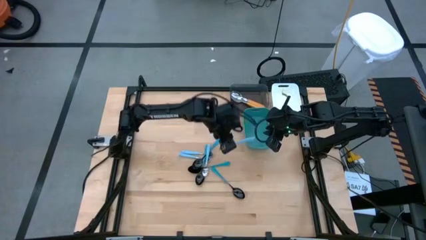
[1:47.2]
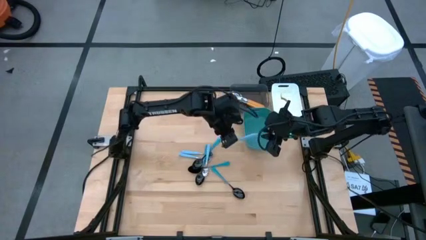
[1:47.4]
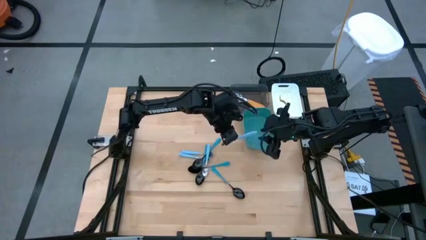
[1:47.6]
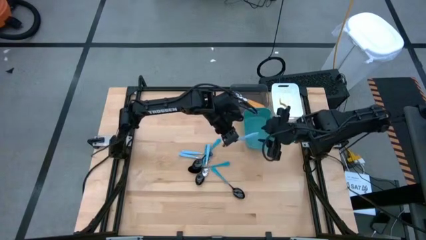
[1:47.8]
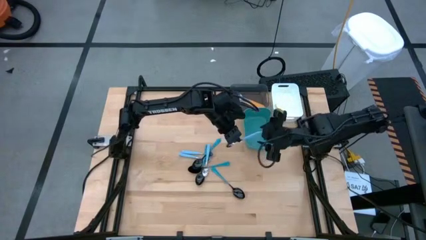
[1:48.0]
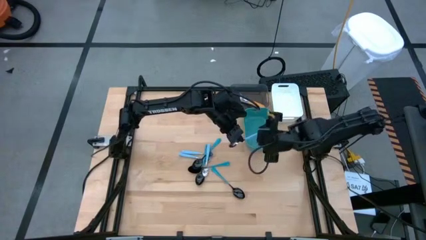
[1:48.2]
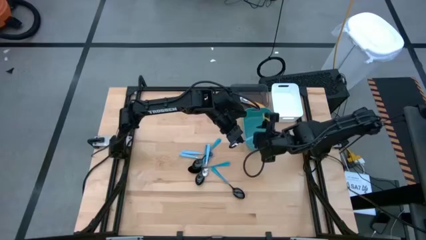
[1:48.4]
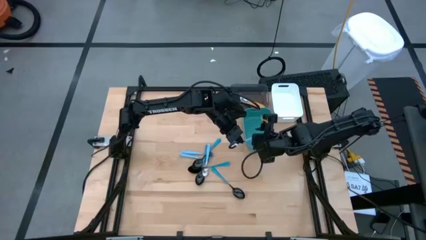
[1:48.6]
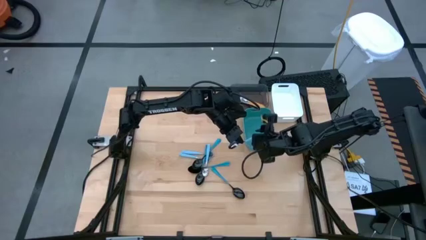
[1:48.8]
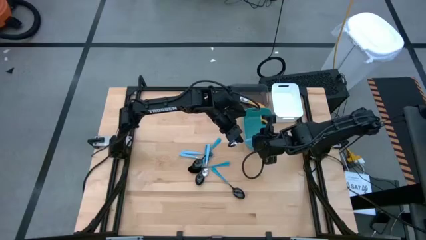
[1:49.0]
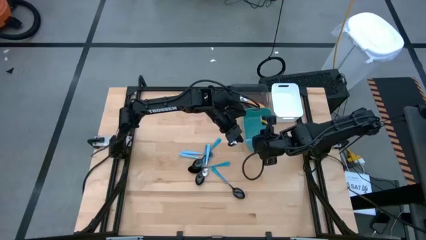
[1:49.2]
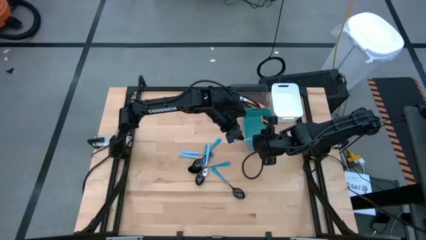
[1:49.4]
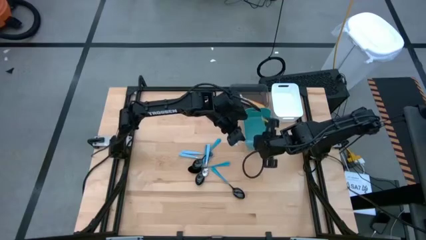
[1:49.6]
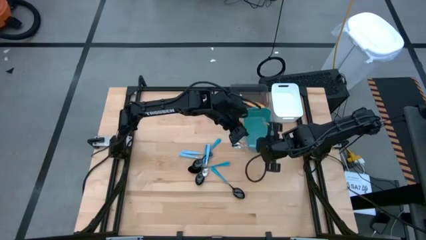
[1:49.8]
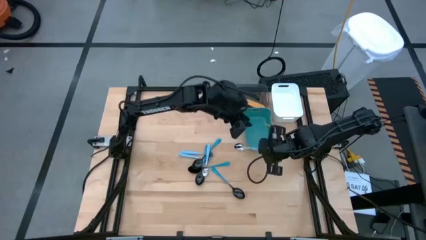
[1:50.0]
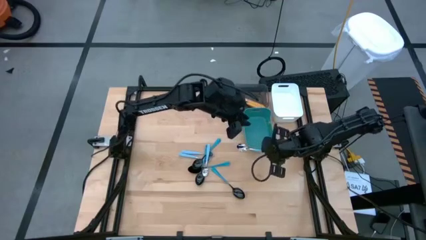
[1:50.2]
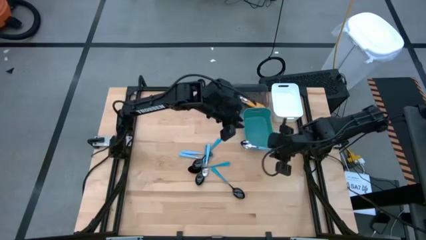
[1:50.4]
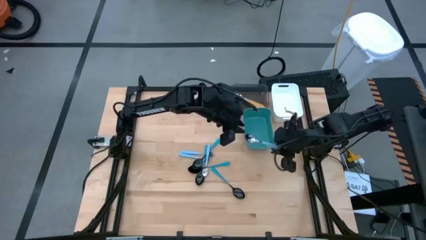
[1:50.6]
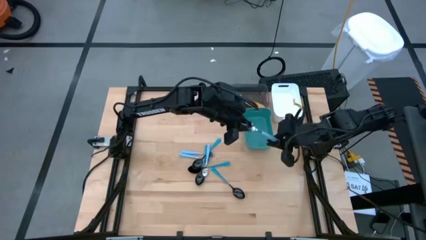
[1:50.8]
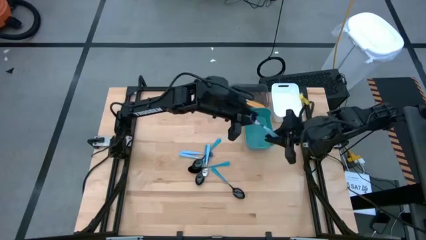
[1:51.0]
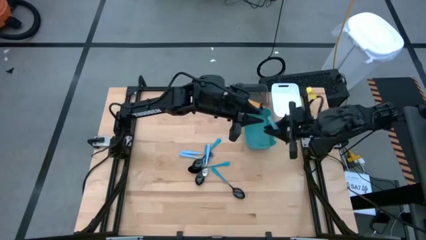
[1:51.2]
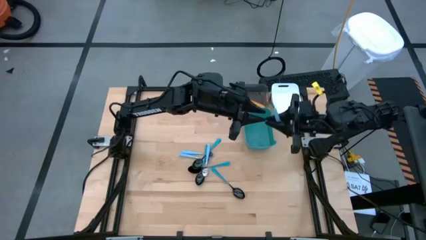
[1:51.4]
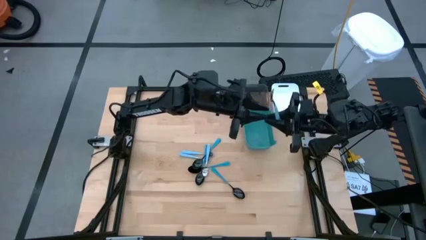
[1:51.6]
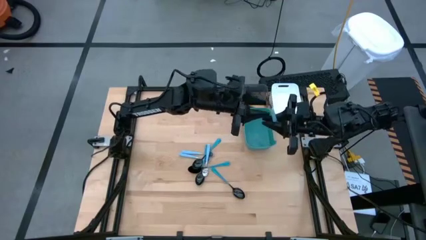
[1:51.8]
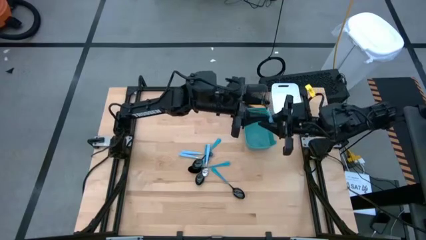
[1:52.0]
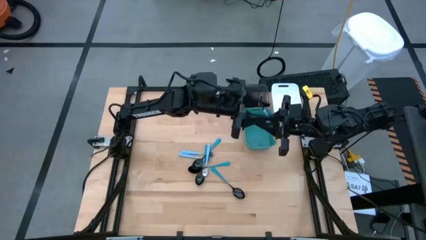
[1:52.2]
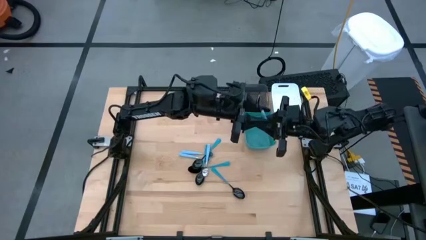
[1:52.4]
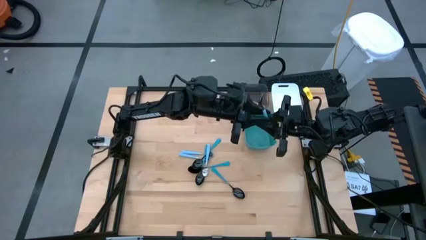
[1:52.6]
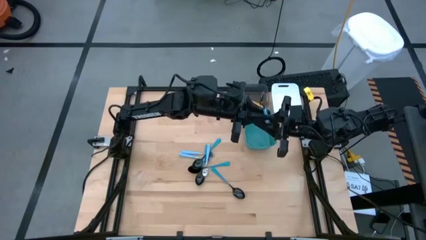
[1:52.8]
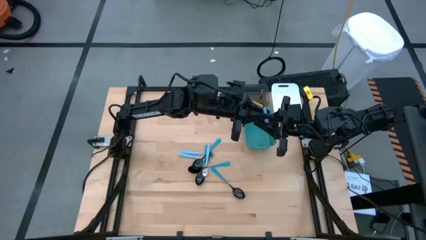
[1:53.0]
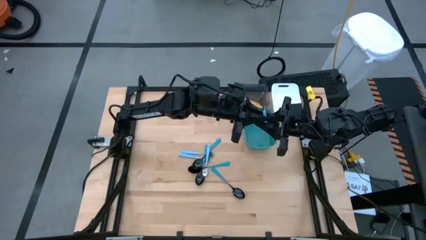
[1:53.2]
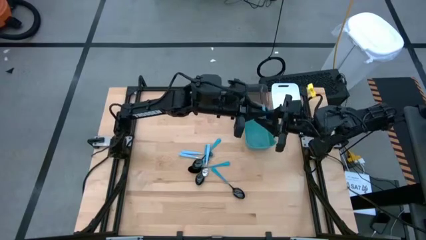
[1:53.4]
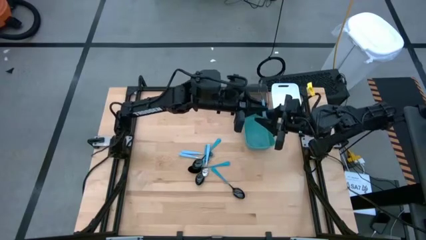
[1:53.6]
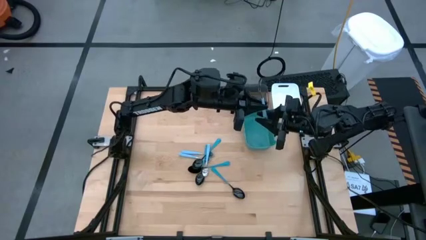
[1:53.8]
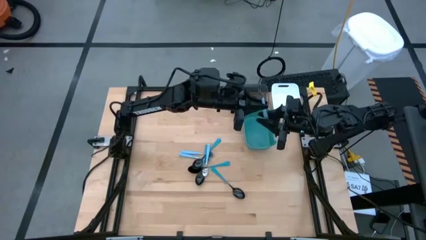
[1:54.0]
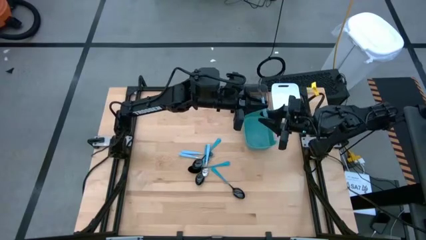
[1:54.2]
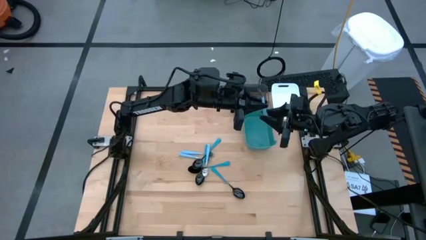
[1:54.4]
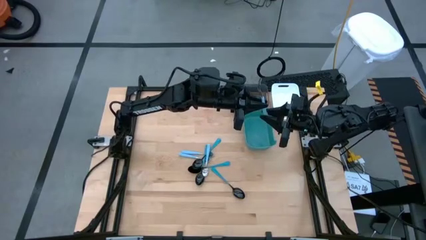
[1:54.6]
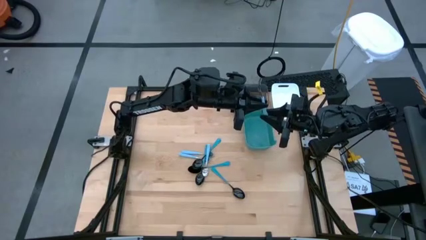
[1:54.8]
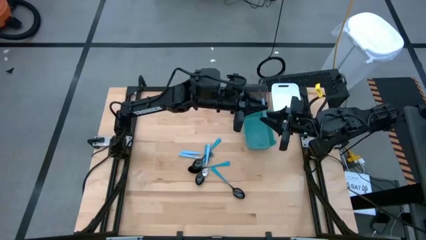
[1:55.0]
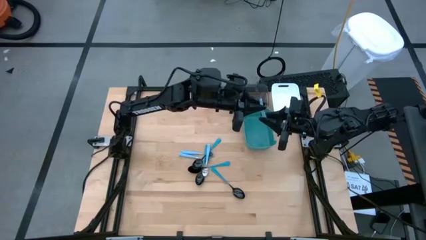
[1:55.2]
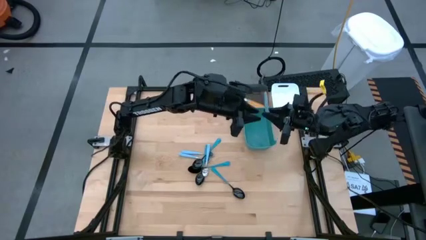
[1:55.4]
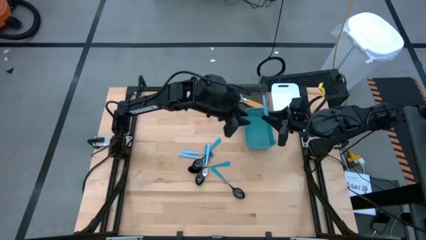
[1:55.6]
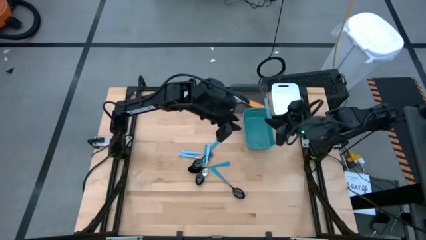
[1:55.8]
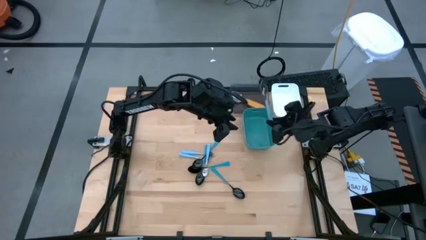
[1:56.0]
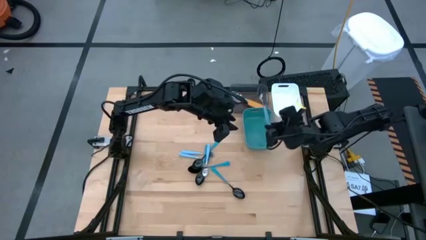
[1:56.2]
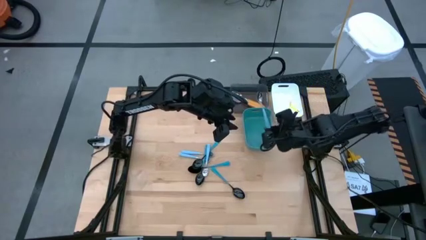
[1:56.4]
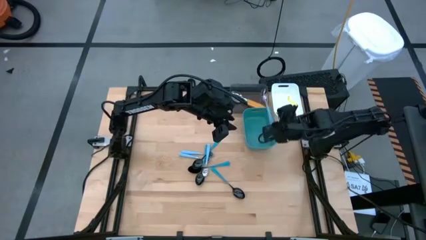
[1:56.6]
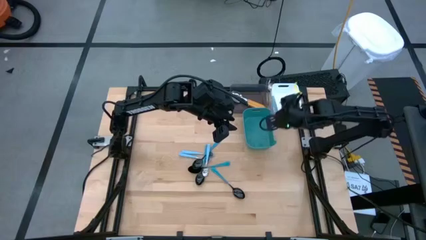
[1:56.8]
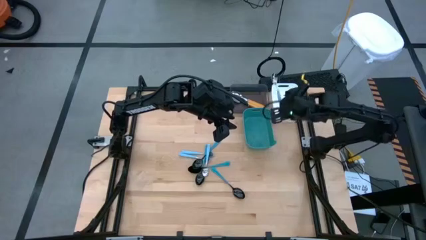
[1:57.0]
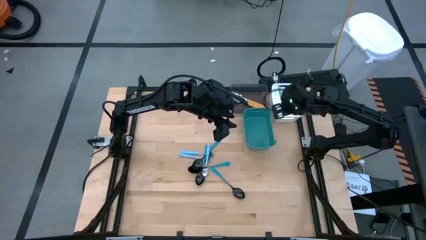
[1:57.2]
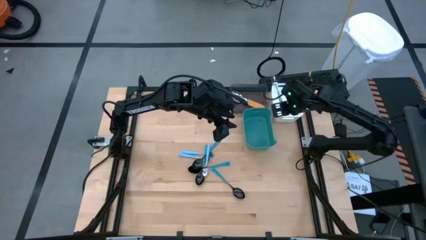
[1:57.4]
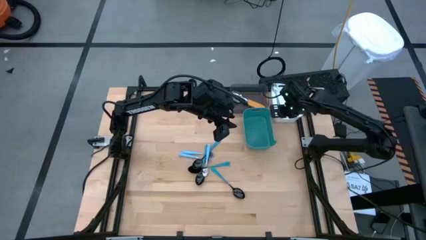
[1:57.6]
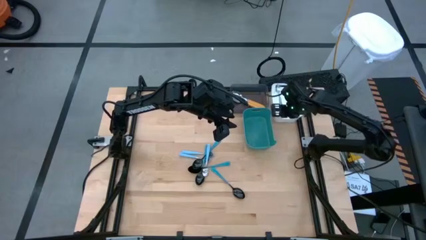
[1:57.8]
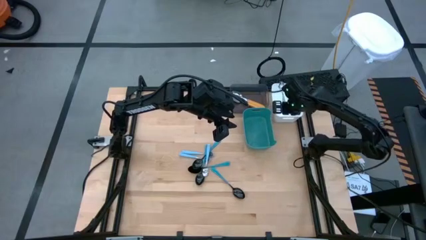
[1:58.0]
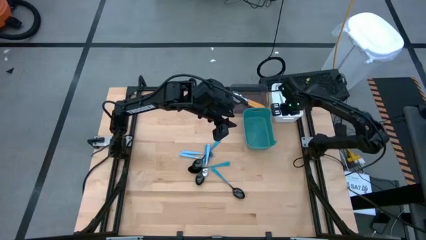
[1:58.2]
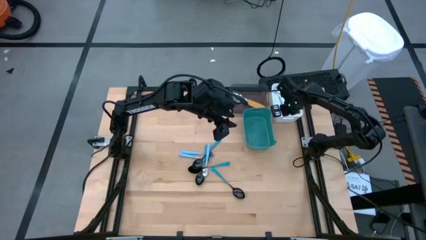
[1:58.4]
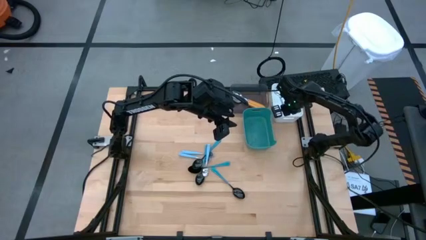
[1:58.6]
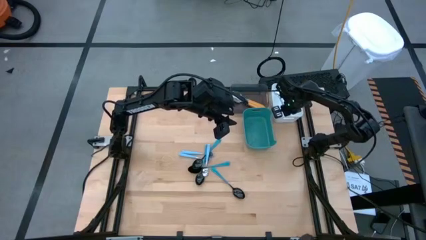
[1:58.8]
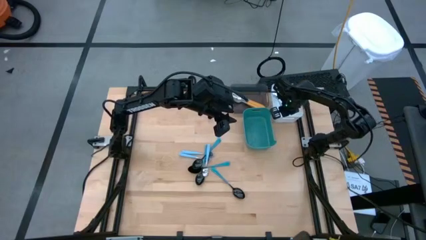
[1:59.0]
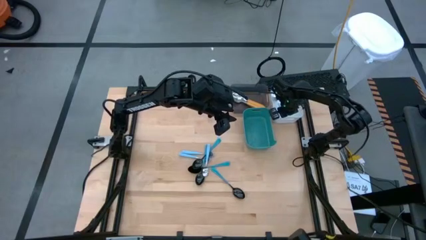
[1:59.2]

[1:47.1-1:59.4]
Task: Sort silverware by color (type)
Put the light blue spoon into the white bin

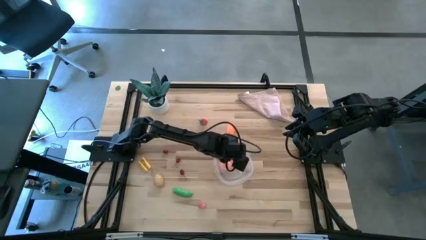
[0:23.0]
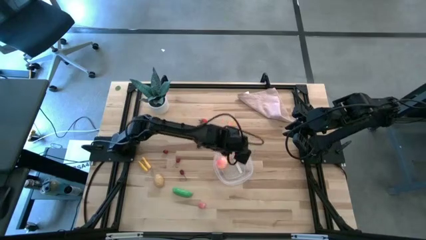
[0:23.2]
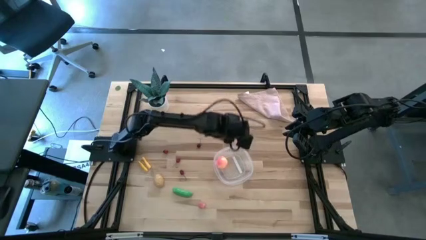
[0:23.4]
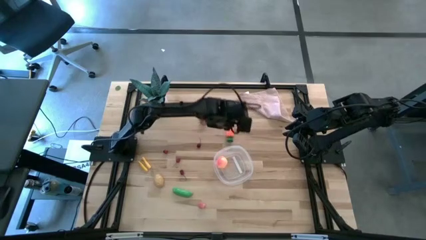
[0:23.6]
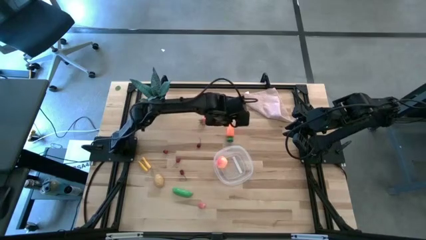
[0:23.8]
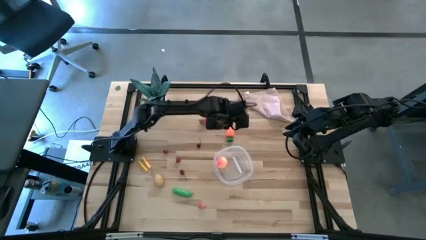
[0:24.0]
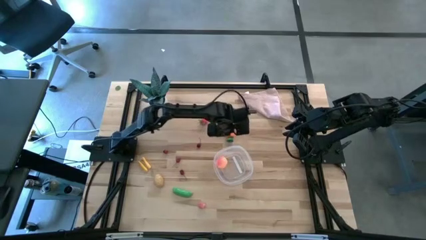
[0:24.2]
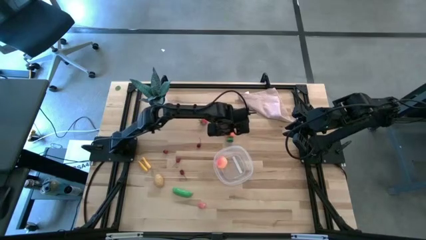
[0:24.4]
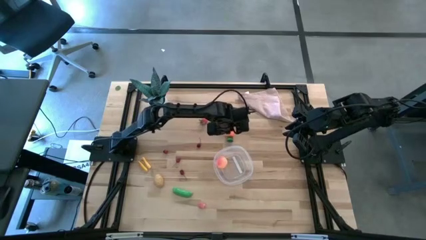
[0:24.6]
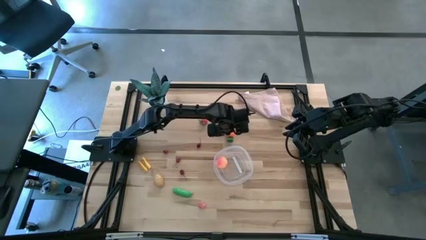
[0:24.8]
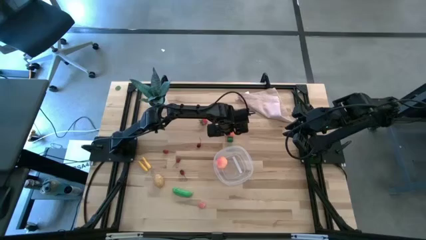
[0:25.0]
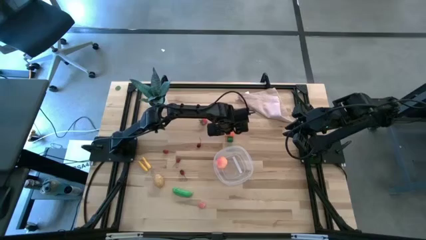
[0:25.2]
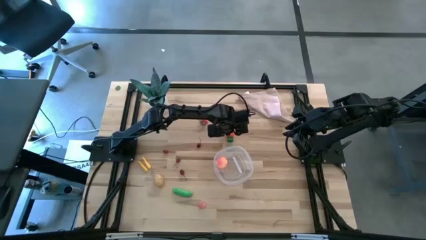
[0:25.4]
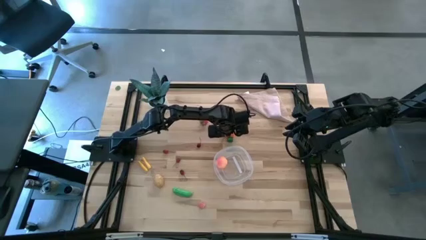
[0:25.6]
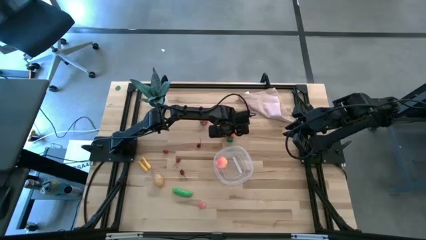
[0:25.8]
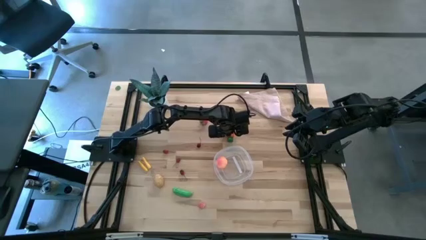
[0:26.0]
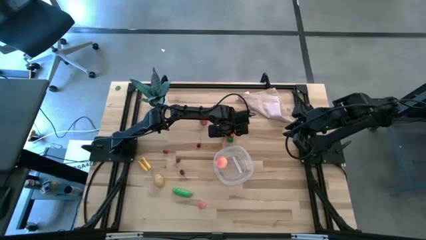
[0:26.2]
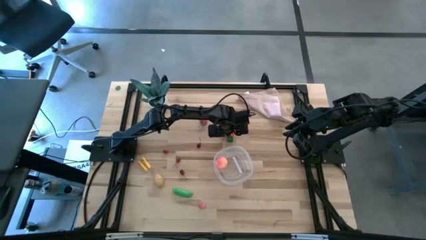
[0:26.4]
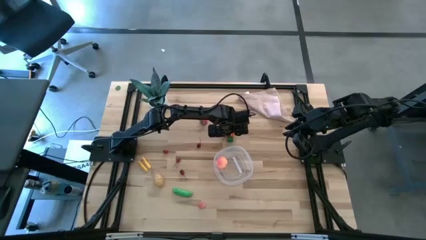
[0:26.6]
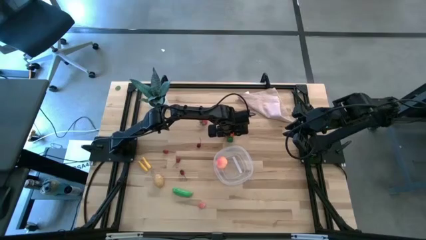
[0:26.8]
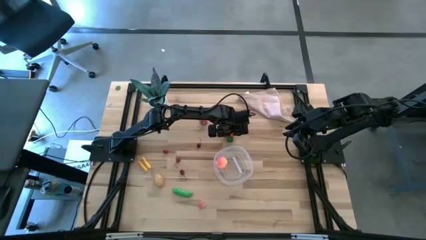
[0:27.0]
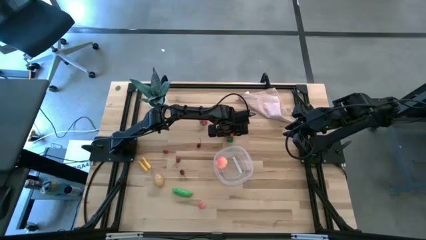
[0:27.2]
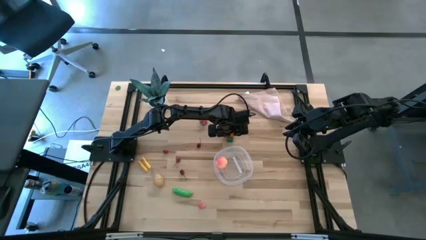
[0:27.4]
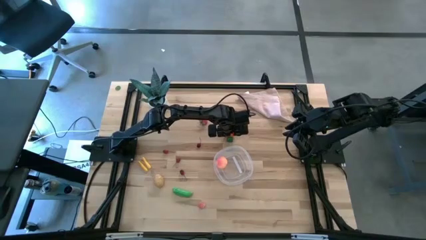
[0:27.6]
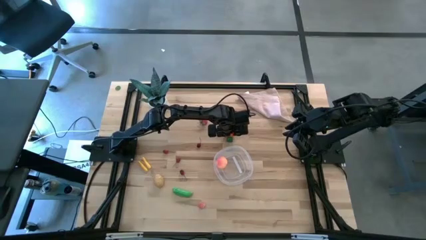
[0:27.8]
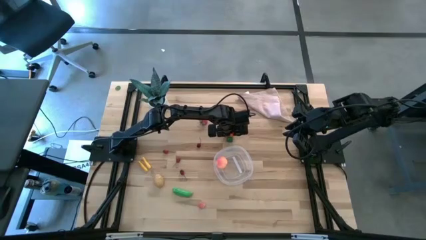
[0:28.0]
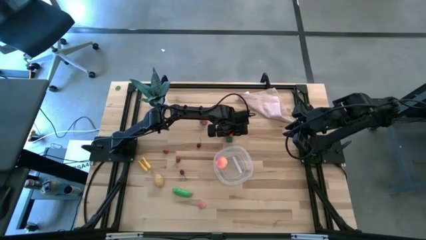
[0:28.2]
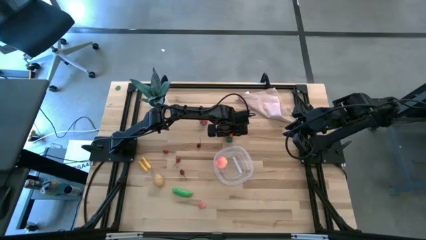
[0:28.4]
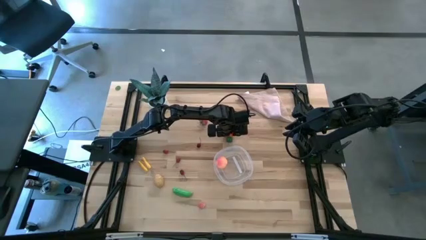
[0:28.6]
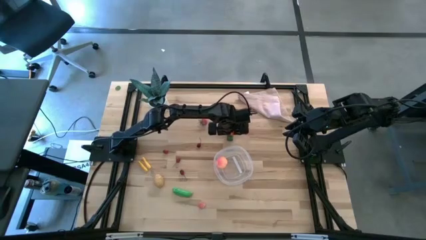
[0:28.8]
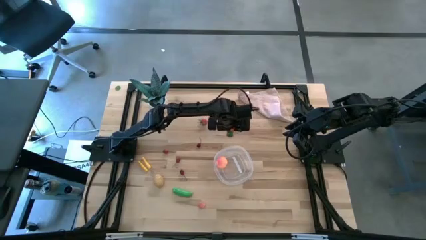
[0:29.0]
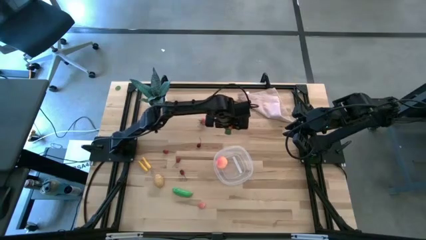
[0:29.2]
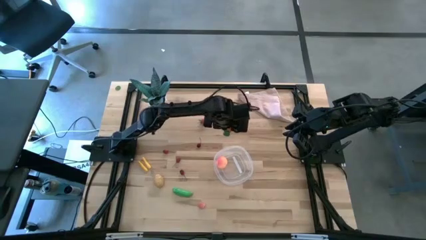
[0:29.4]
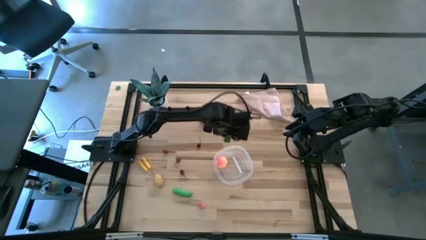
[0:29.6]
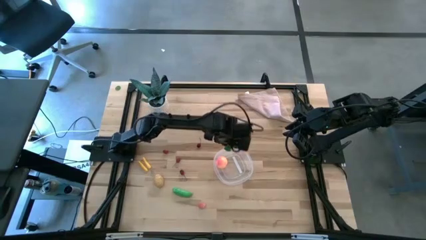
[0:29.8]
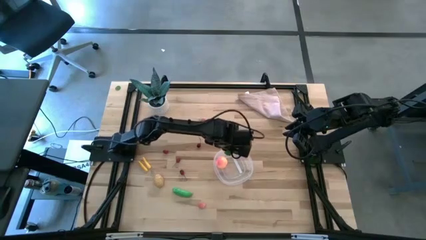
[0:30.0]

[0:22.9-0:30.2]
Task: Pick and placing Produce into tupperware
Put the orange carrot into the transparent bin
